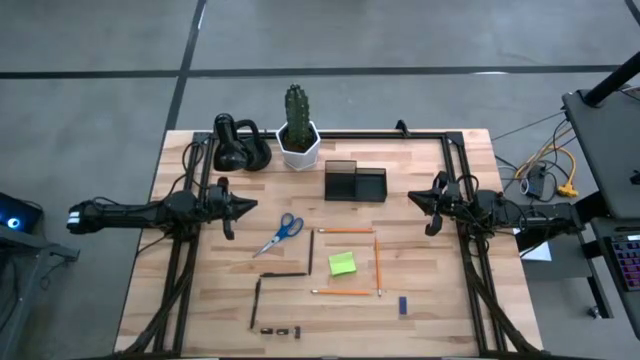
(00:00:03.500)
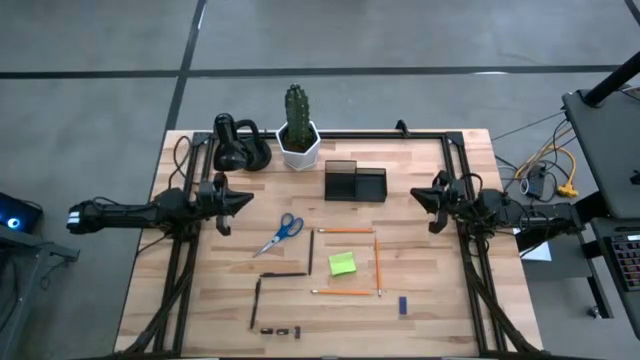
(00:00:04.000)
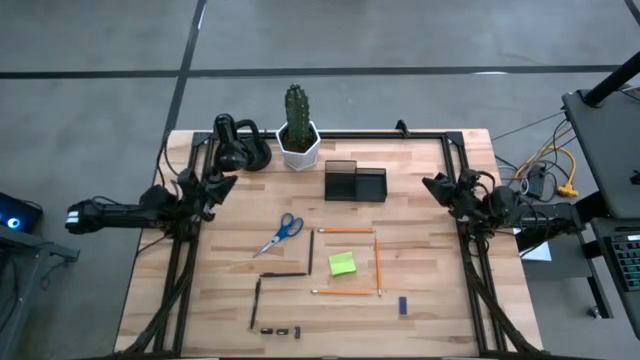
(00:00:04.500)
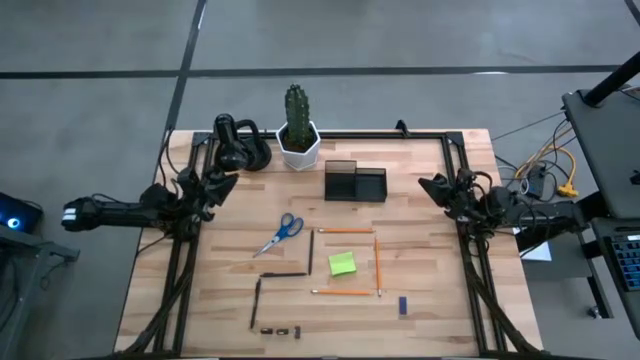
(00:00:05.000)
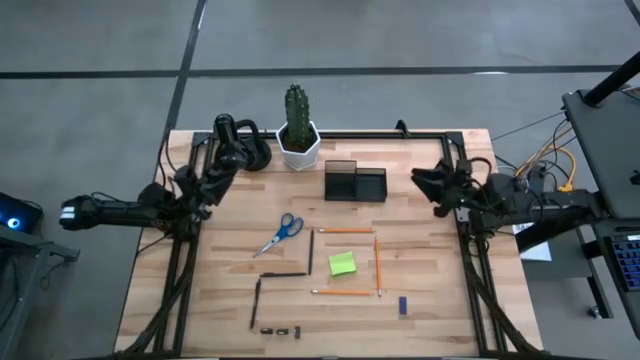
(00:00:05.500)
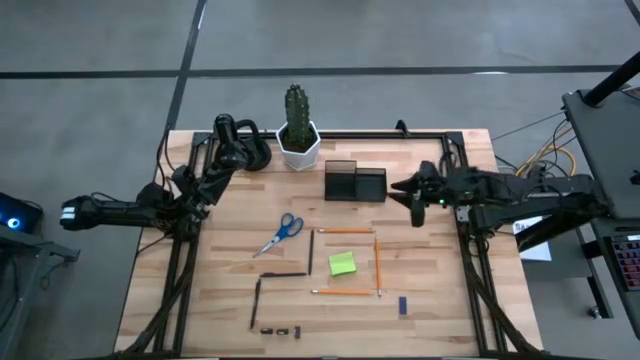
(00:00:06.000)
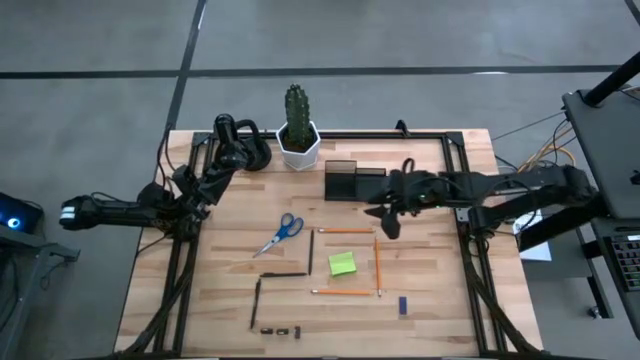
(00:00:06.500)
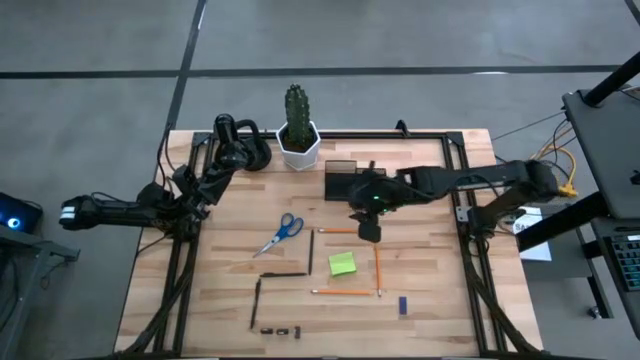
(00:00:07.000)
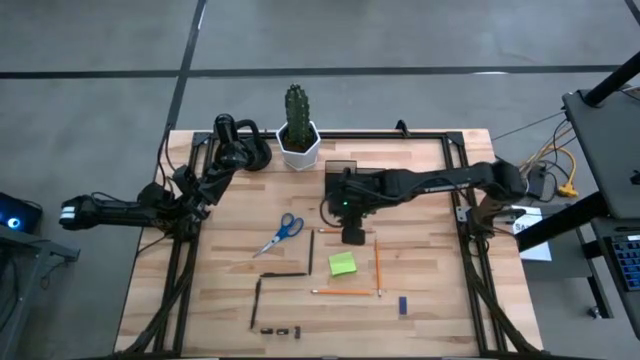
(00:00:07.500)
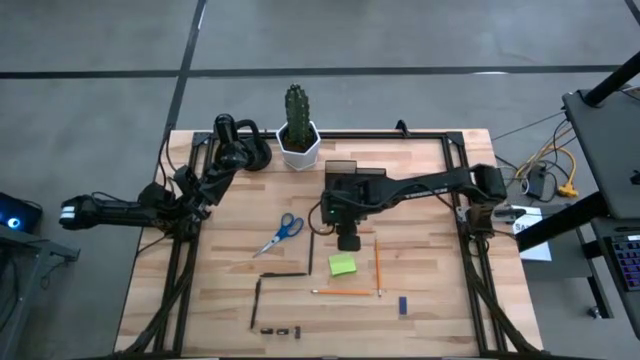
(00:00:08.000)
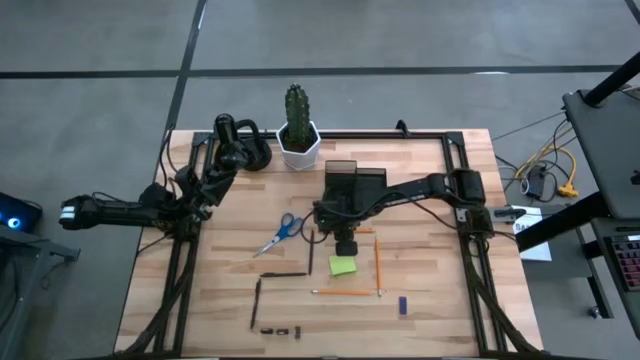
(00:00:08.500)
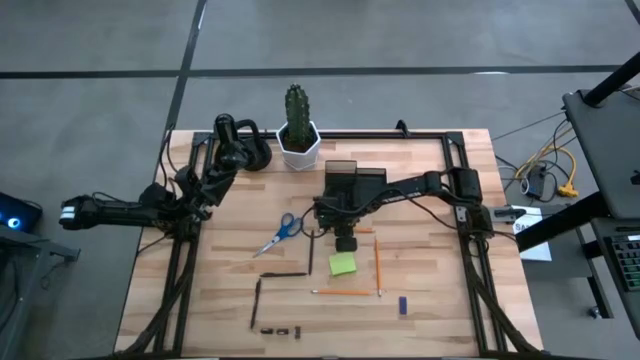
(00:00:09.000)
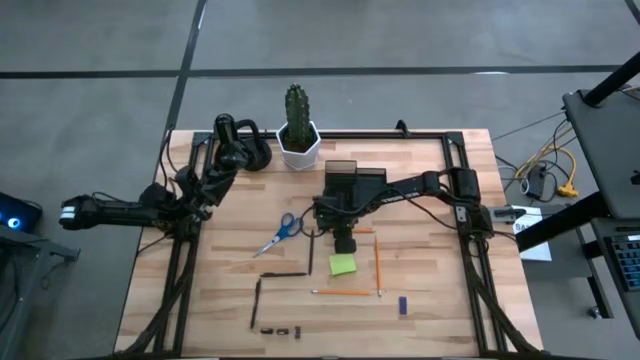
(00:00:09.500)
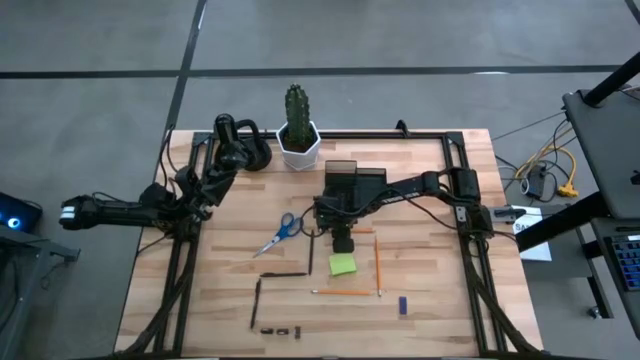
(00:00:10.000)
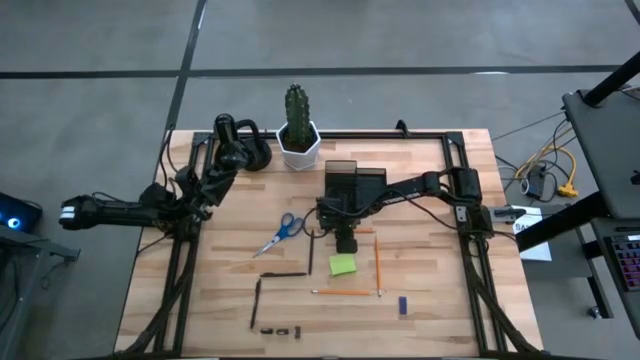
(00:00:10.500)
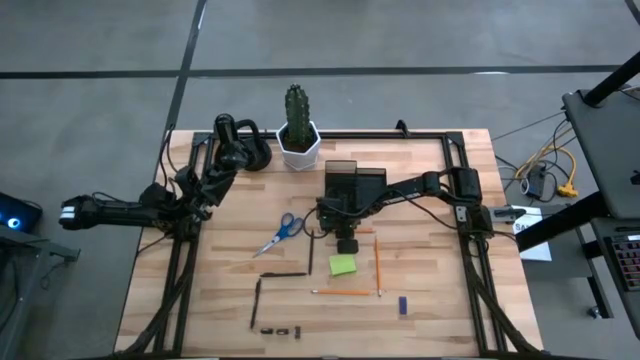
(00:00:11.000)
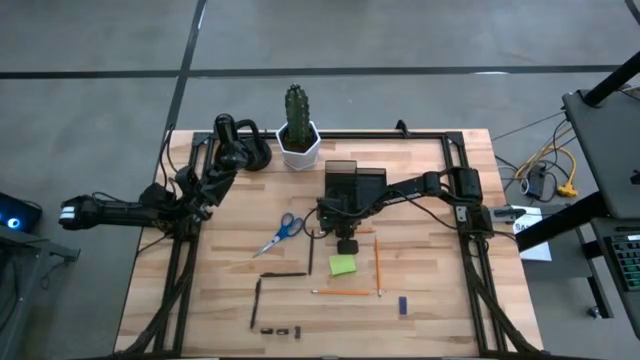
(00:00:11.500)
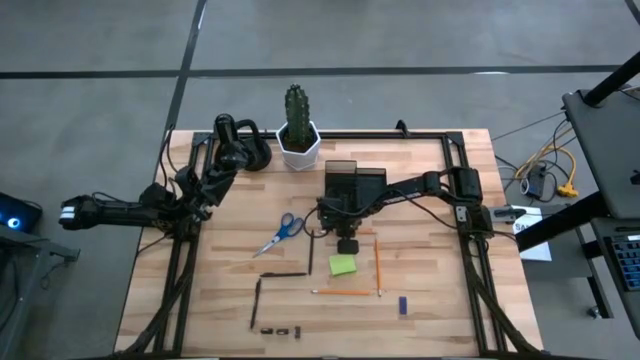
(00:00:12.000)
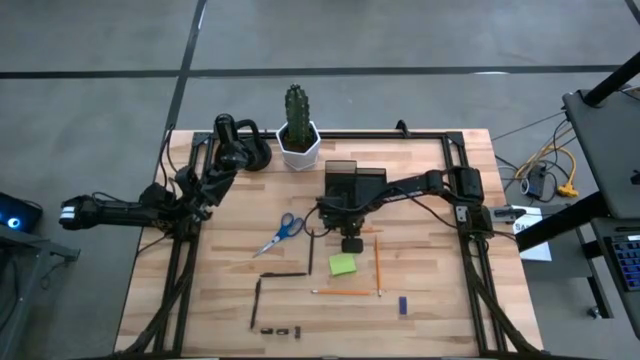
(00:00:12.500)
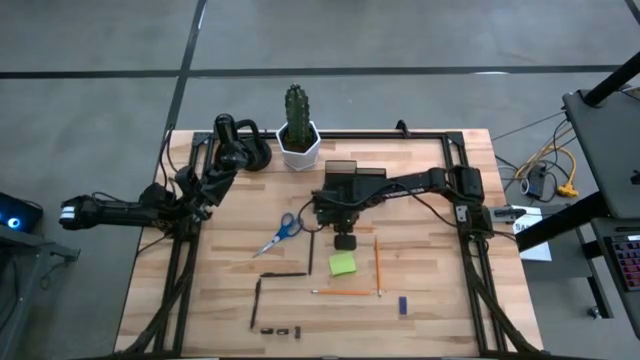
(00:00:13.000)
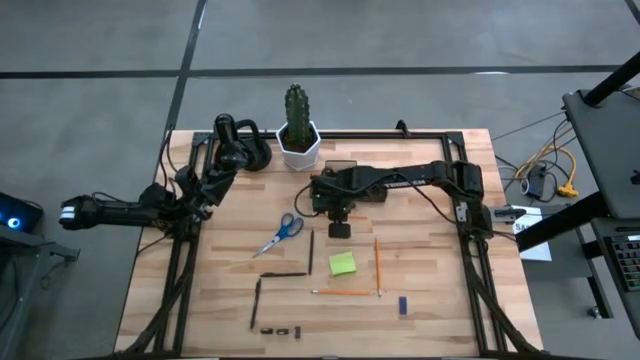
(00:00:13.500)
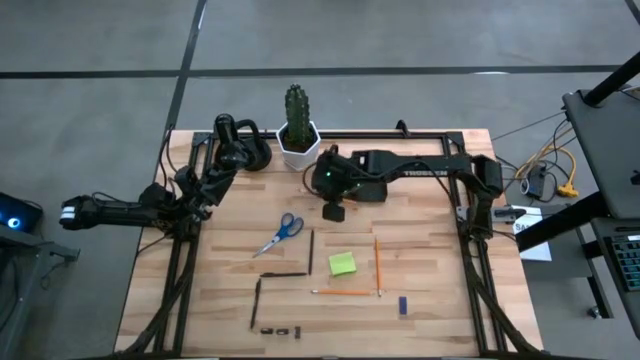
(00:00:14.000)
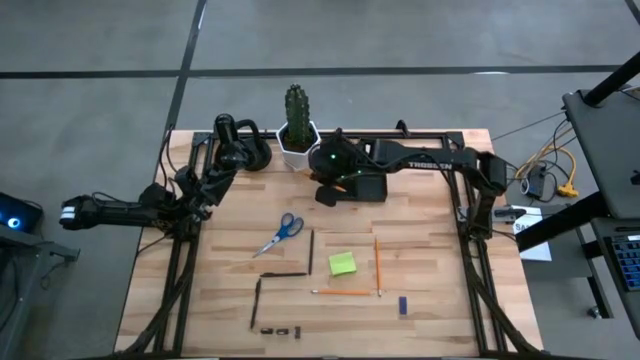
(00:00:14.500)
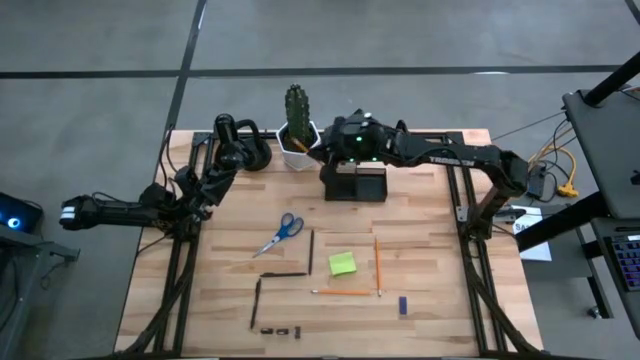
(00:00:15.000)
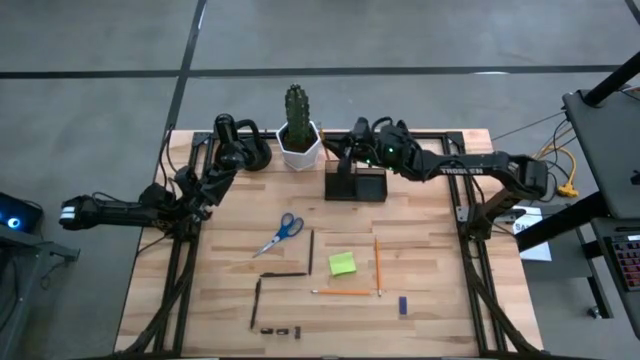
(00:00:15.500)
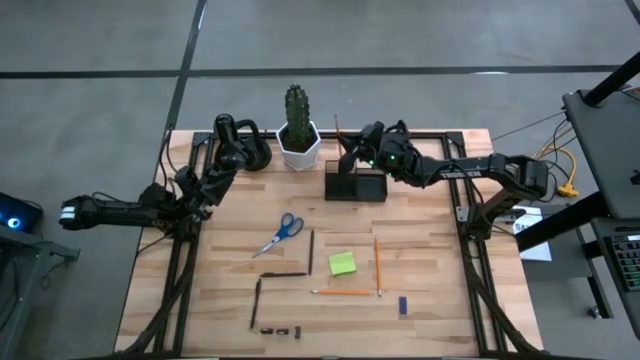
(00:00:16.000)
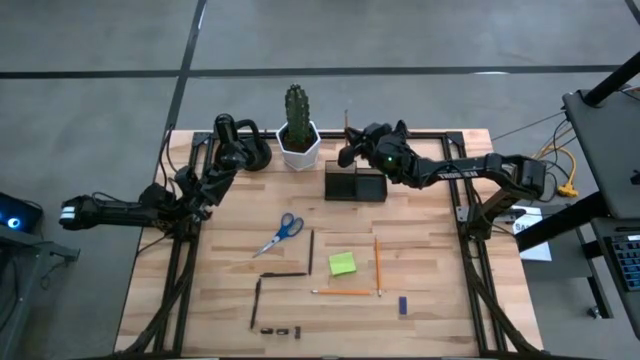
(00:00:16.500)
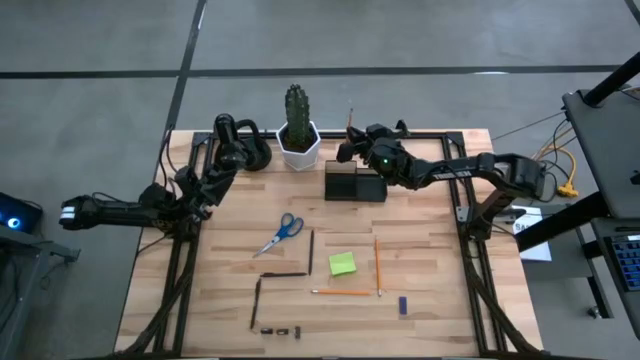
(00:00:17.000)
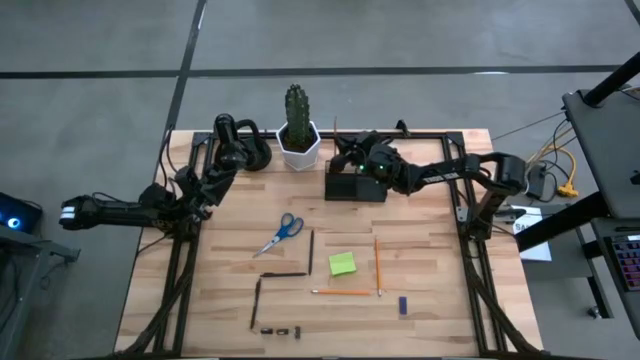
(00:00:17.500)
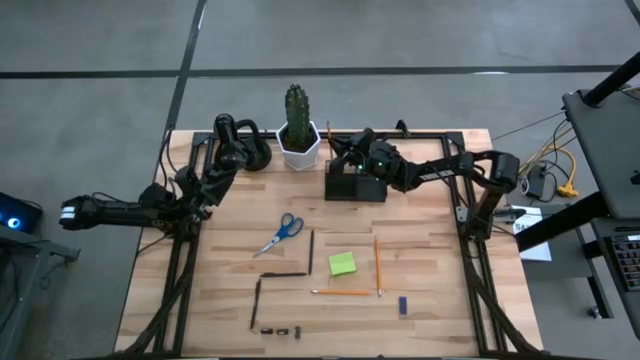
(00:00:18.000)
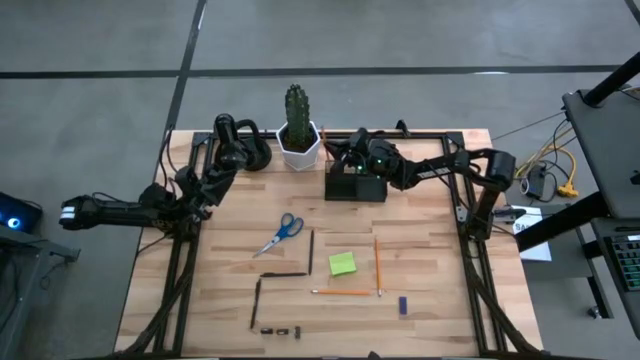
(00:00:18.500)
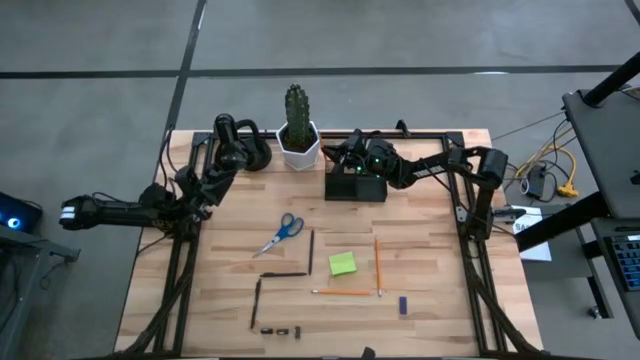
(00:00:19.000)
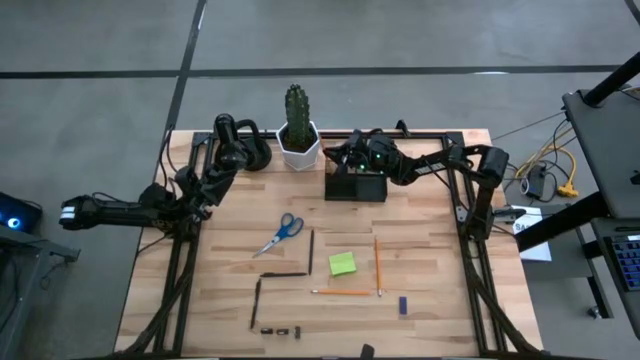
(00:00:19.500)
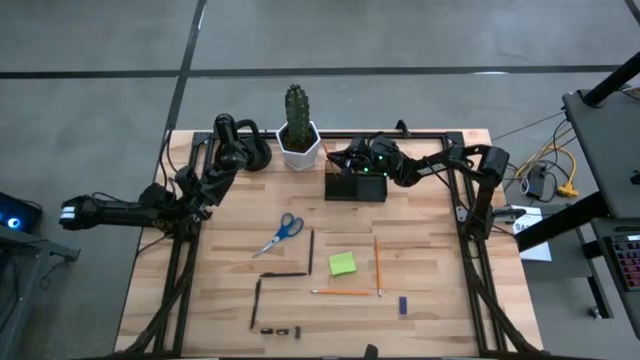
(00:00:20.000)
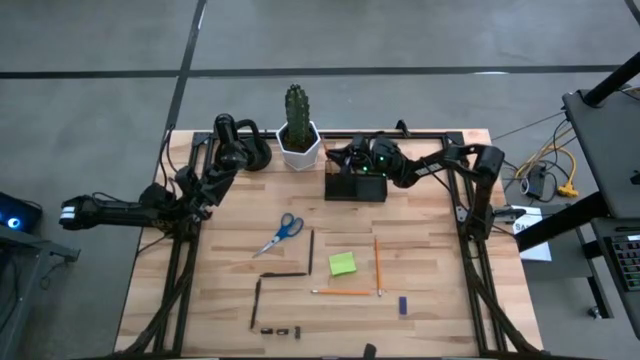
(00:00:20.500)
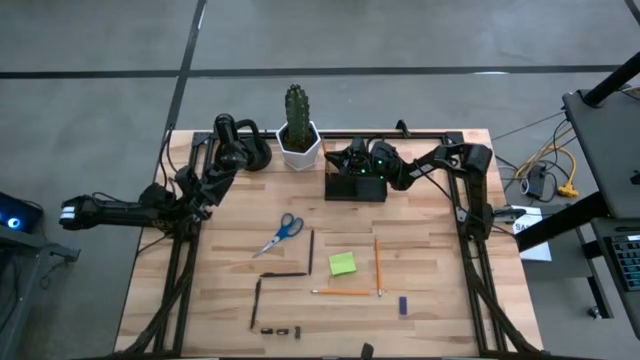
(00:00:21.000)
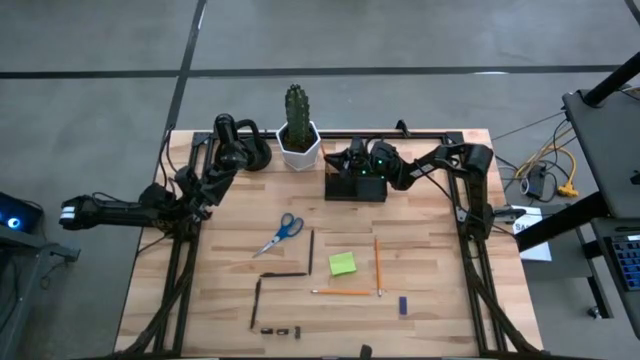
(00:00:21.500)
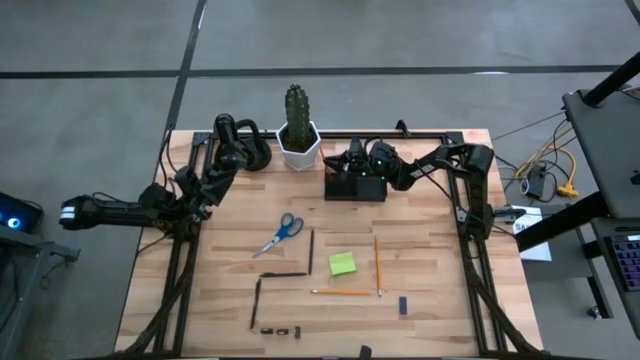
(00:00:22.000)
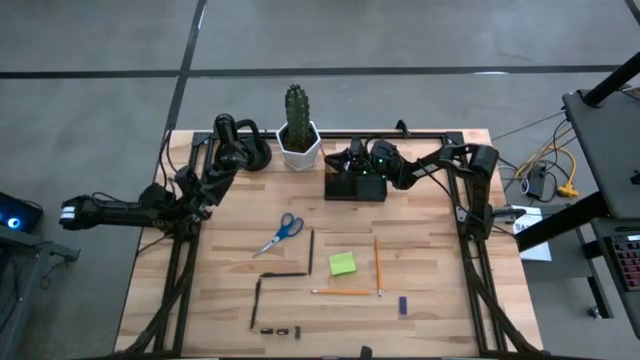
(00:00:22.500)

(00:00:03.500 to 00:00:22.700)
Task: Pick and place office supplies into organizer
Put the top pencil into the left section of the desk organizer
